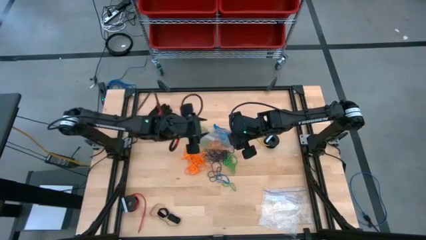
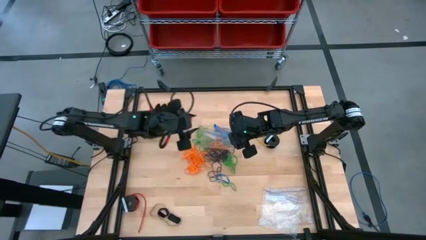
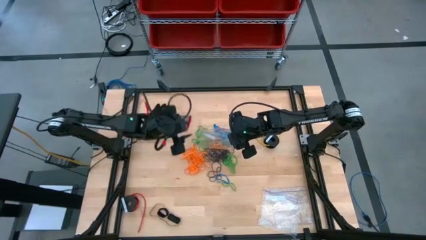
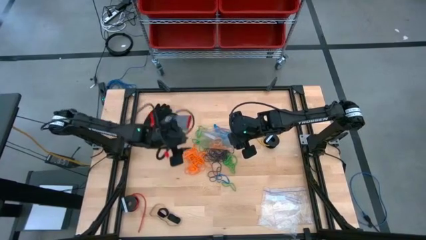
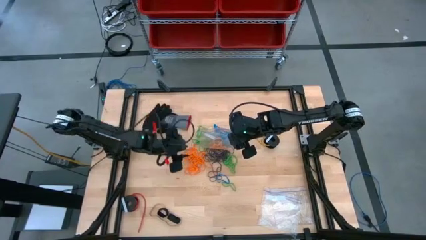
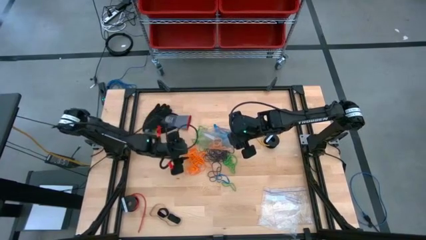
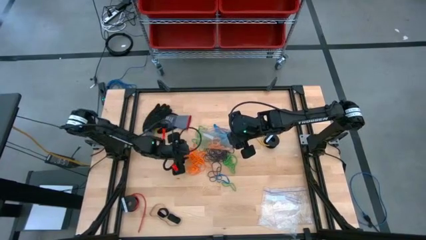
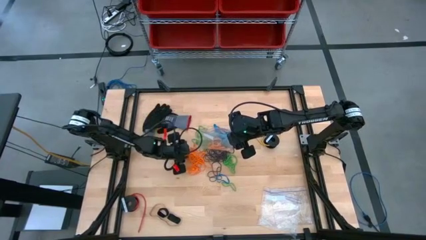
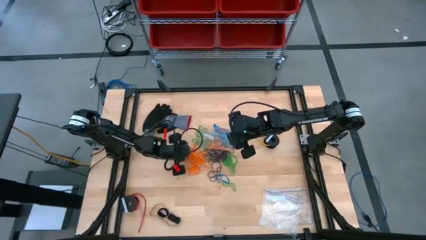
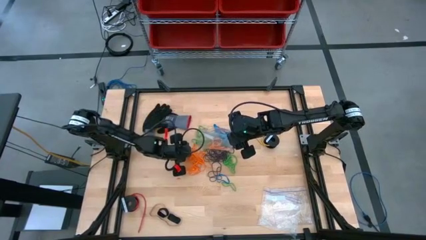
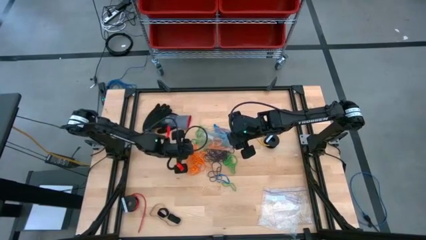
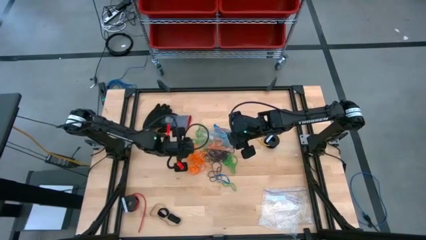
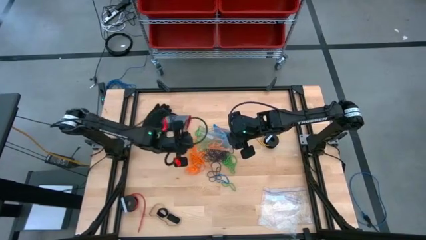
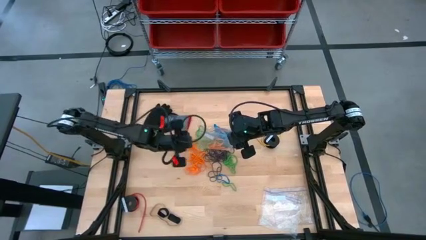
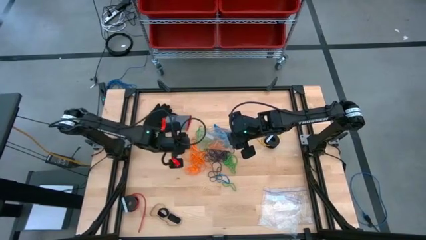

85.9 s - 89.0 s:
Task: Sort rubber bands
Put the orange rubber band into the transparent zip bag

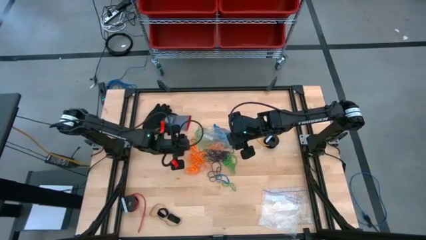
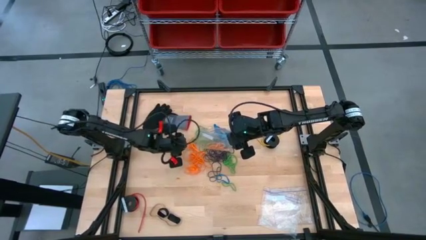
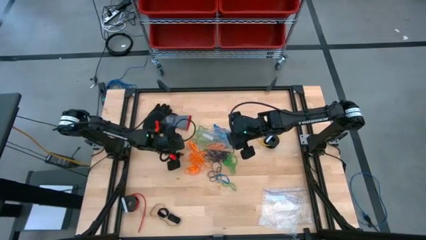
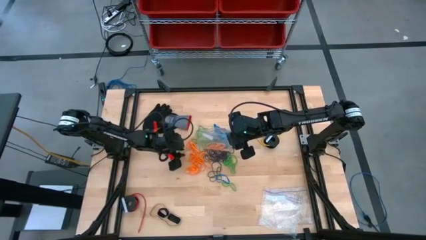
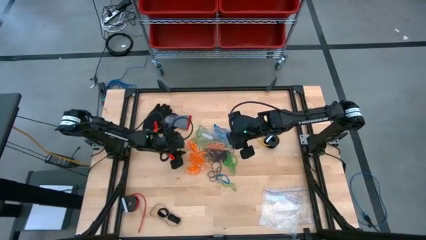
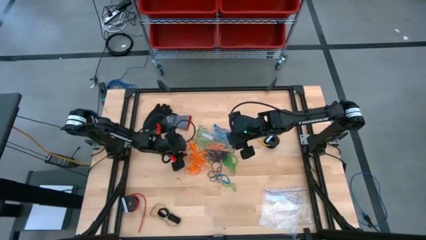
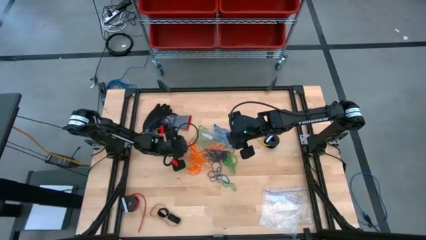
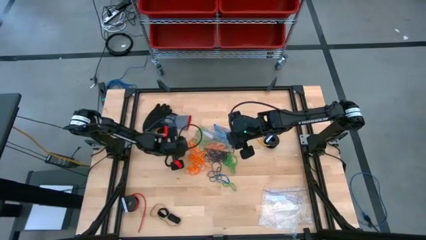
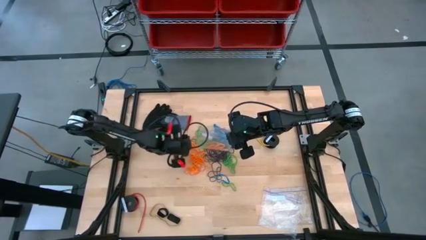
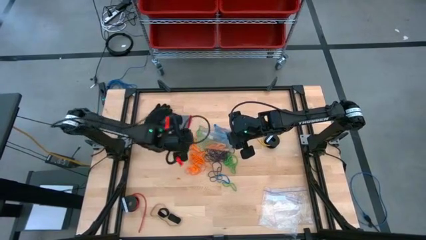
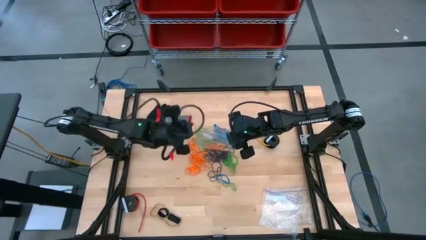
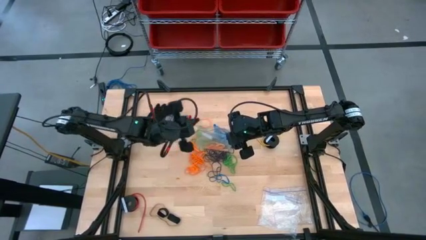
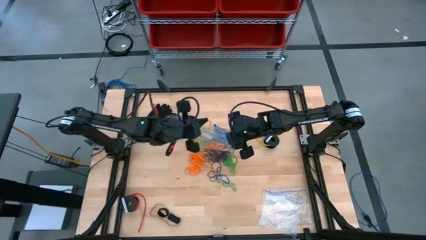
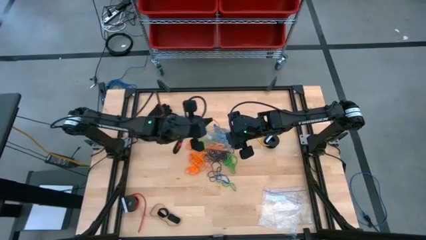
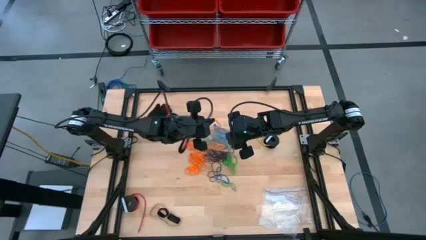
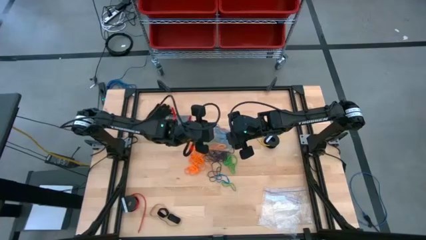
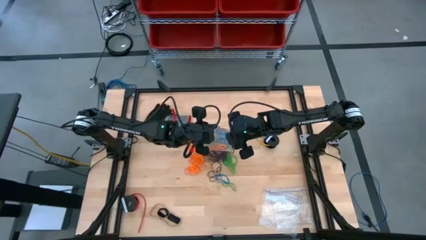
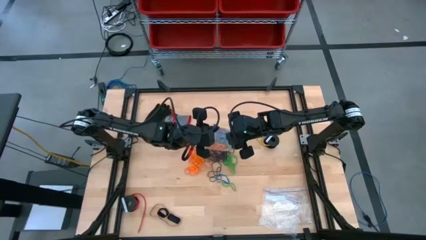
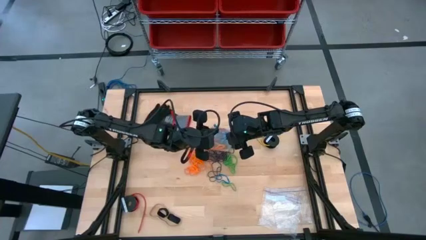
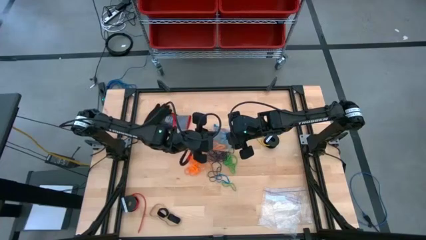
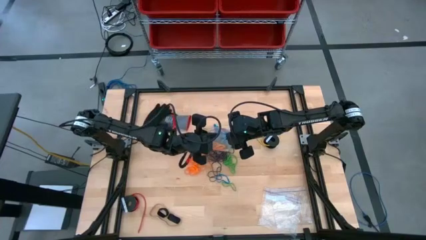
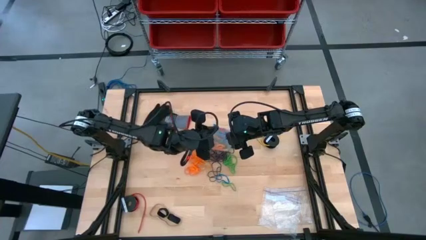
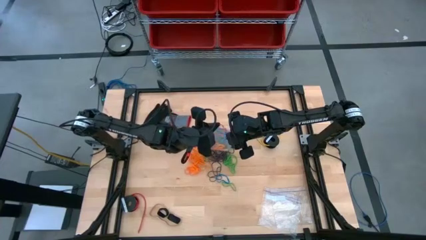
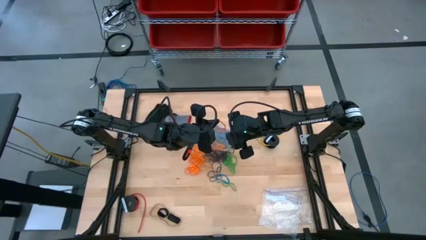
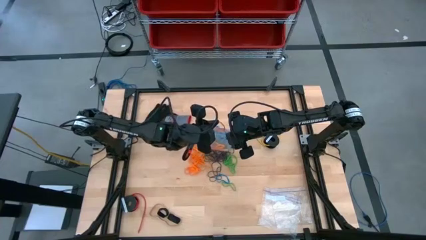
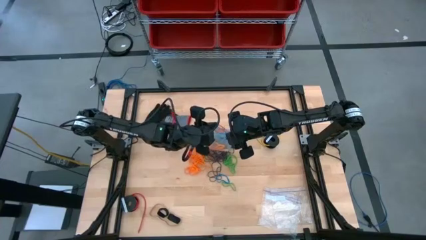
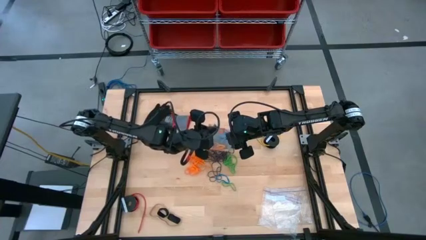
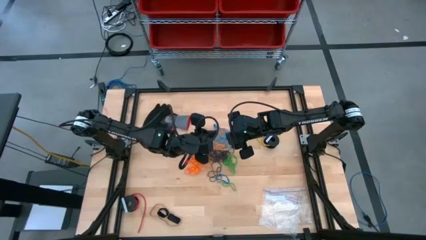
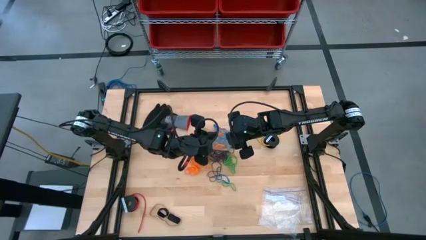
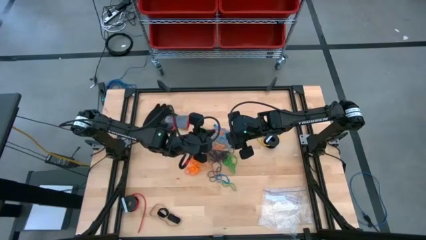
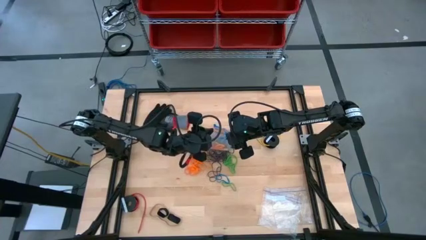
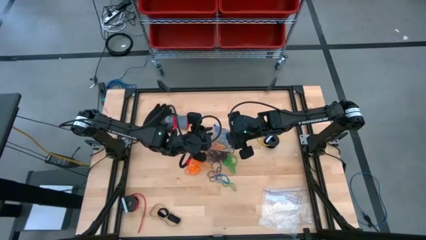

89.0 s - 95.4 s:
Put the orange rubber band into the transparent zip bag

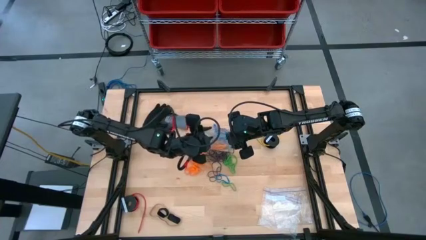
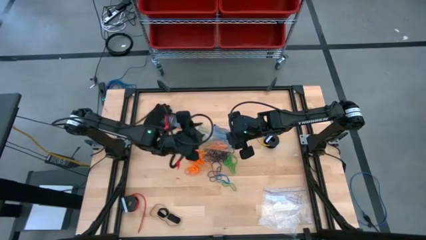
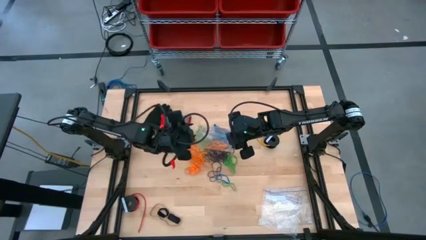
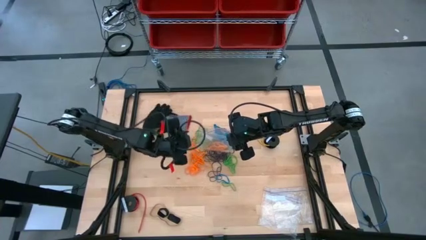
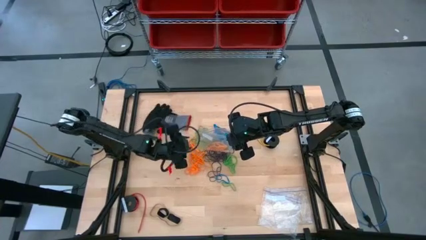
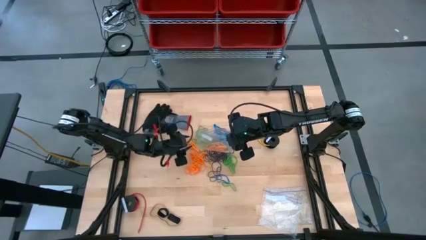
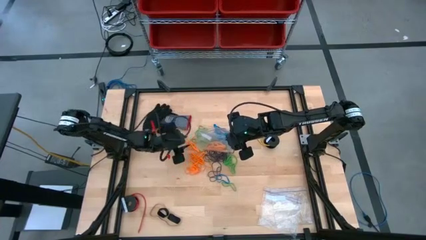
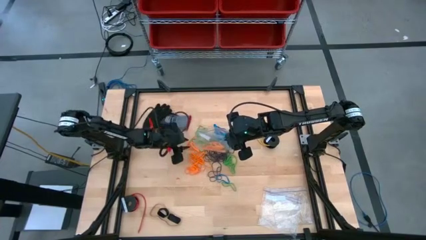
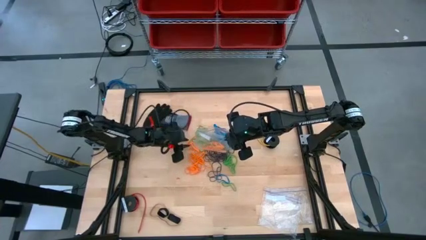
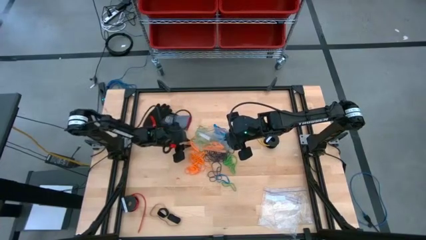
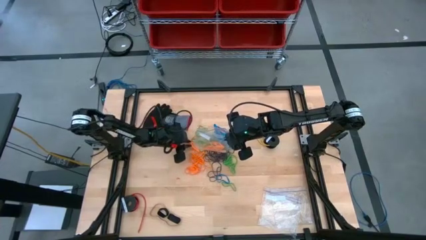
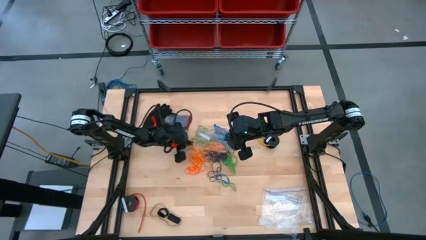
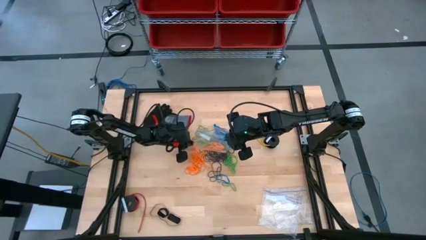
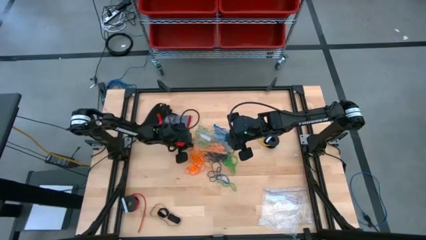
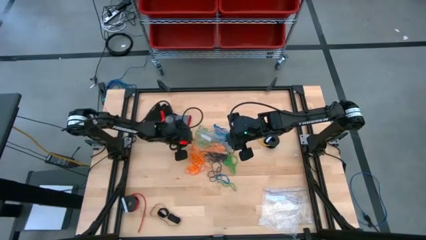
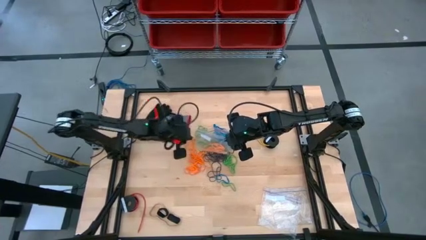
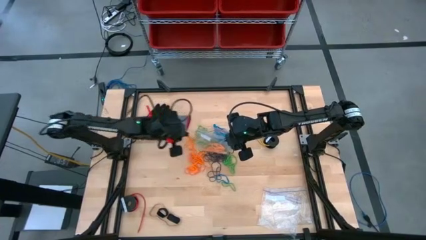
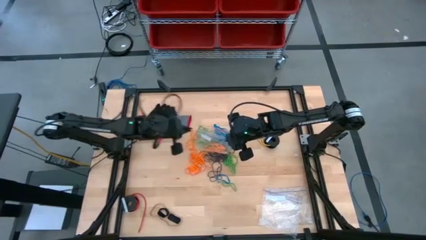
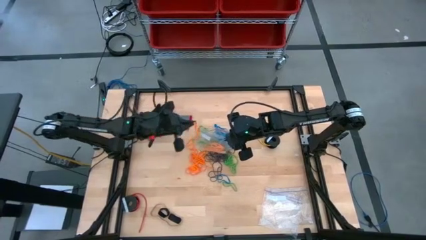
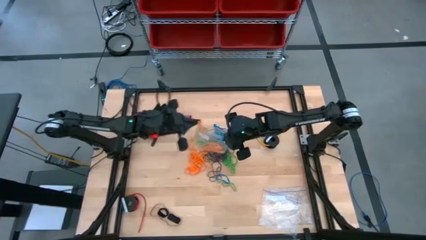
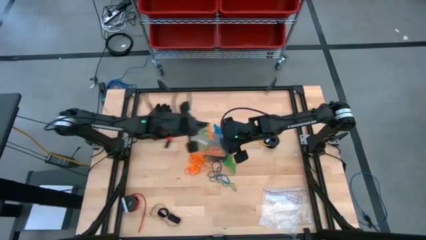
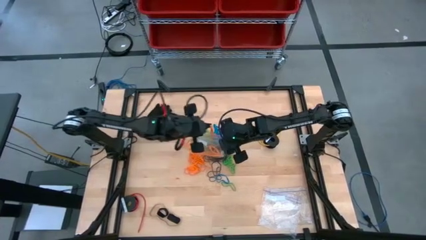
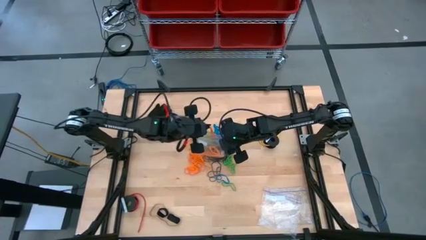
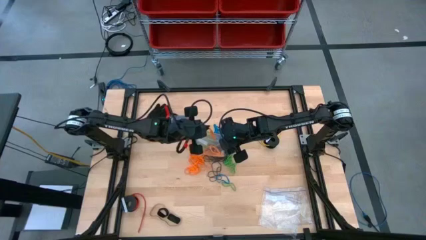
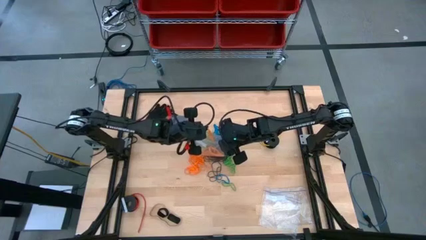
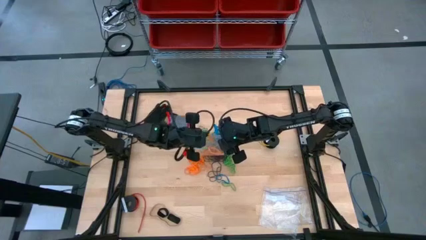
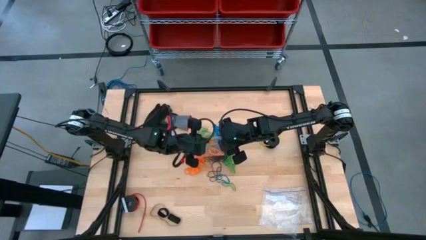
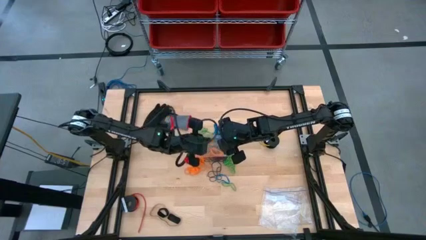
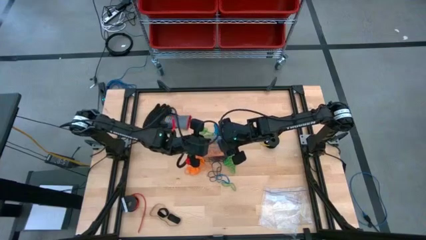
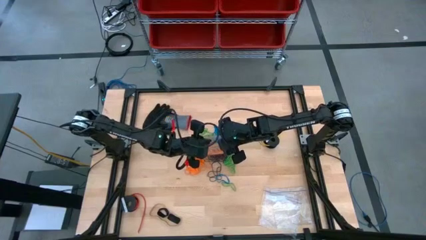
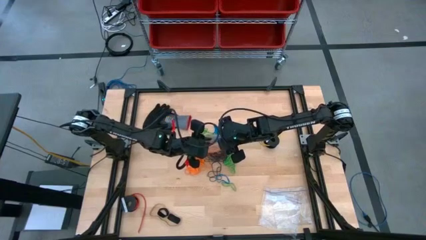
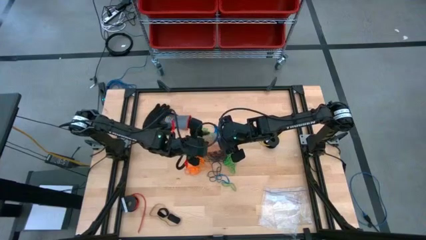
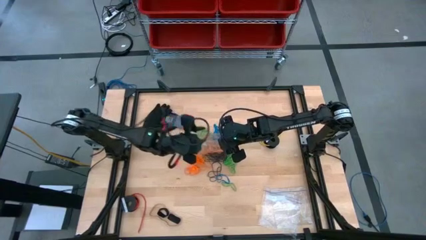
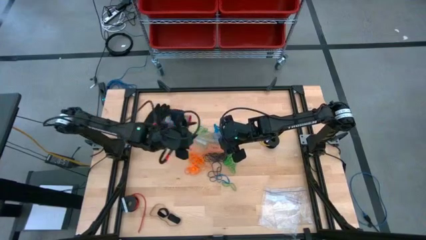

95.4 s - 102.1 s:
Put the orange rubber band into the transparent zip bag
